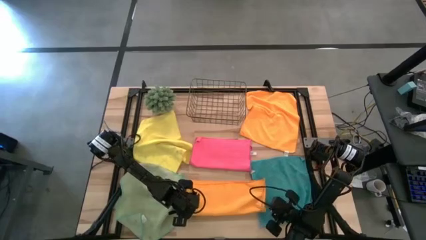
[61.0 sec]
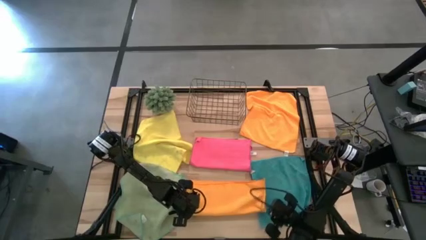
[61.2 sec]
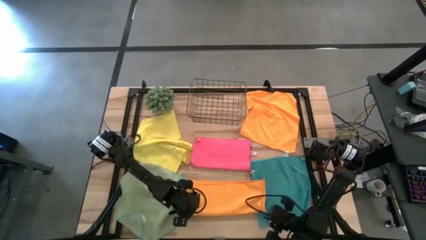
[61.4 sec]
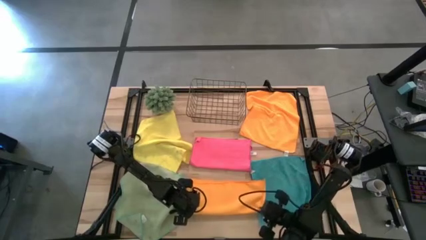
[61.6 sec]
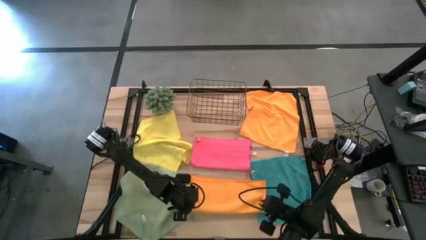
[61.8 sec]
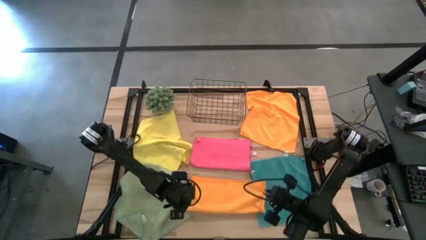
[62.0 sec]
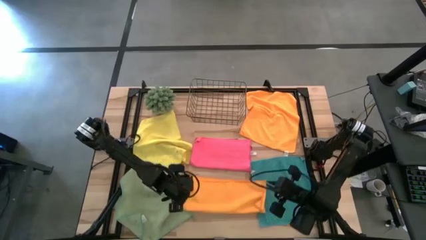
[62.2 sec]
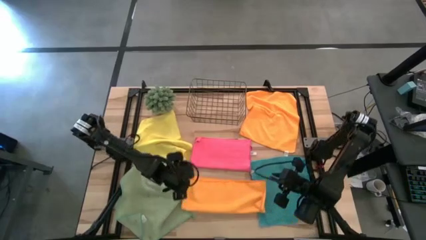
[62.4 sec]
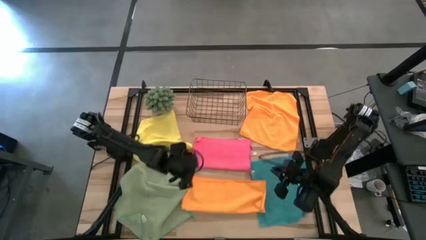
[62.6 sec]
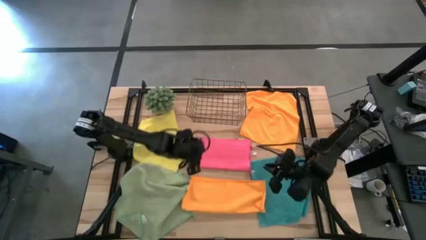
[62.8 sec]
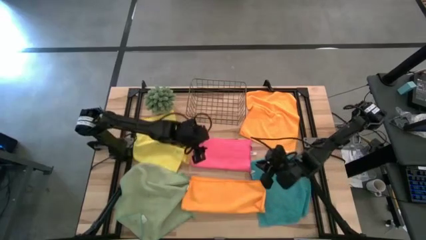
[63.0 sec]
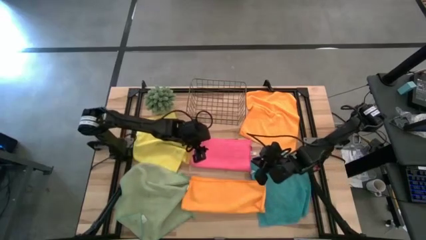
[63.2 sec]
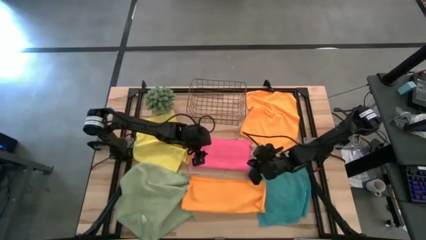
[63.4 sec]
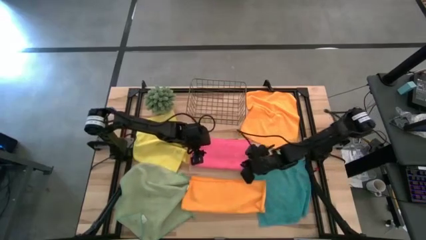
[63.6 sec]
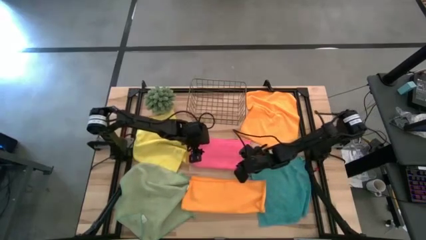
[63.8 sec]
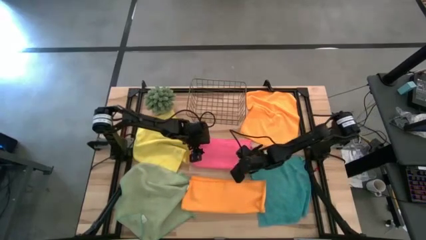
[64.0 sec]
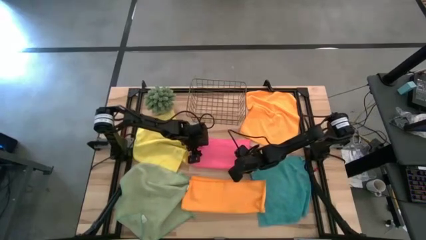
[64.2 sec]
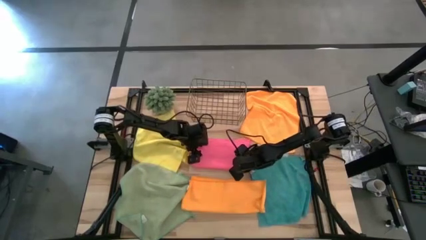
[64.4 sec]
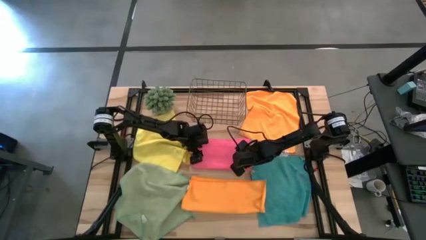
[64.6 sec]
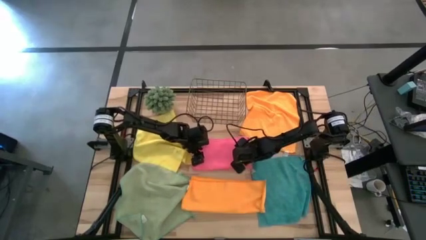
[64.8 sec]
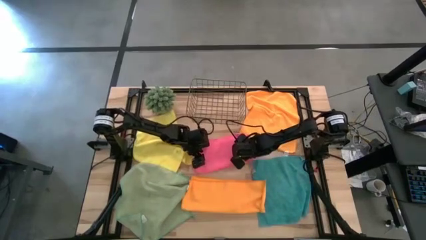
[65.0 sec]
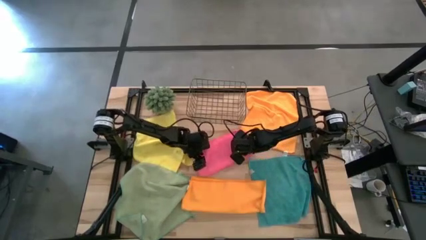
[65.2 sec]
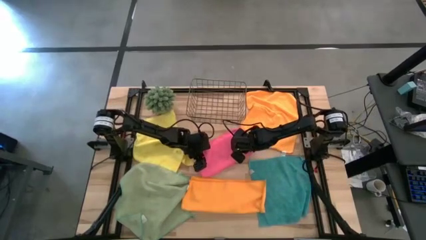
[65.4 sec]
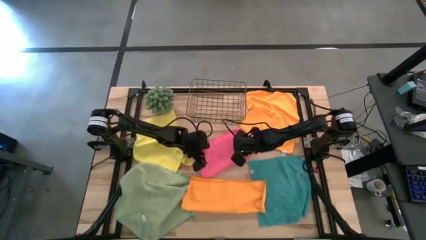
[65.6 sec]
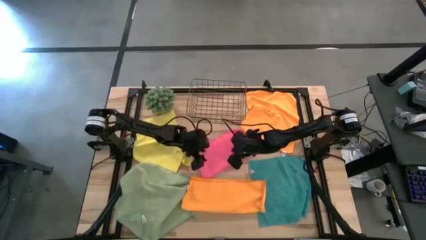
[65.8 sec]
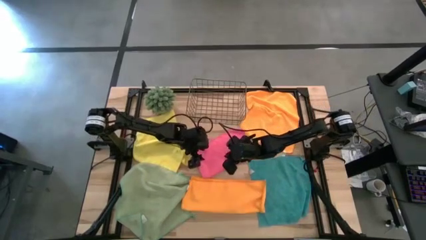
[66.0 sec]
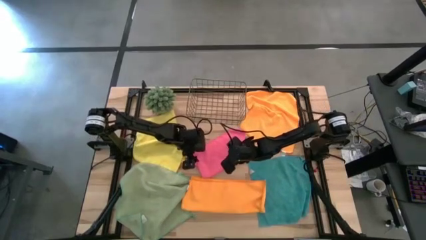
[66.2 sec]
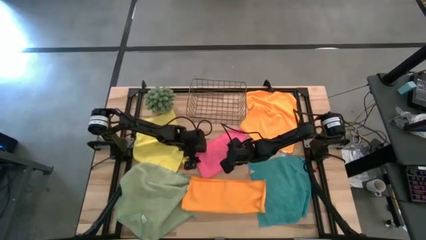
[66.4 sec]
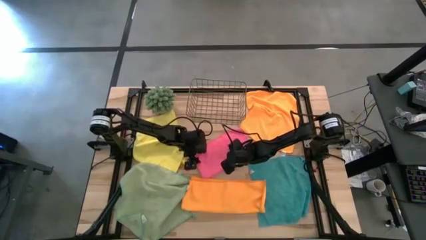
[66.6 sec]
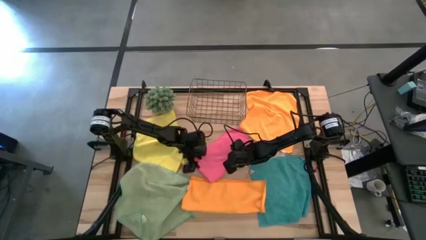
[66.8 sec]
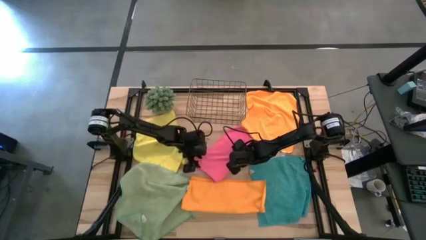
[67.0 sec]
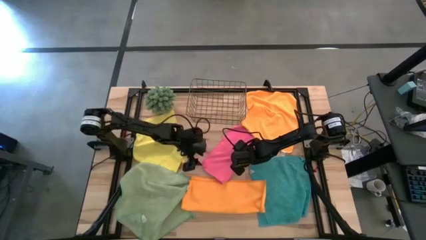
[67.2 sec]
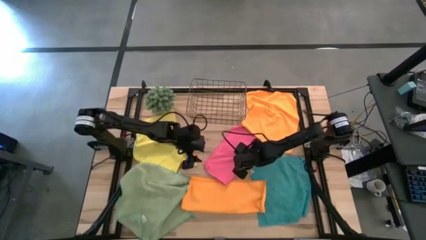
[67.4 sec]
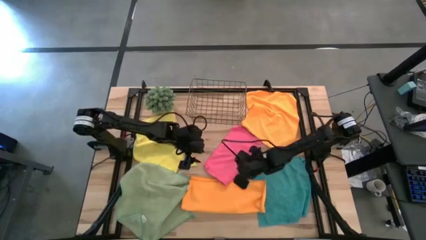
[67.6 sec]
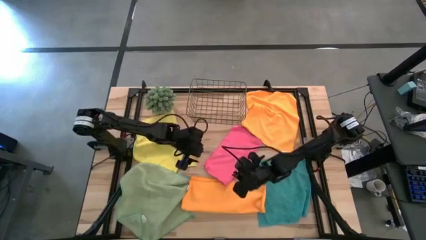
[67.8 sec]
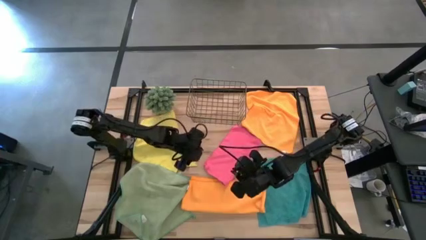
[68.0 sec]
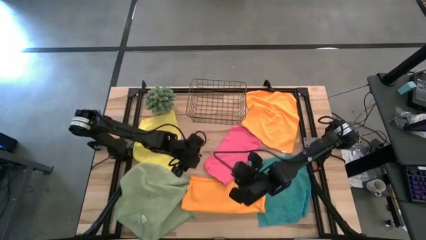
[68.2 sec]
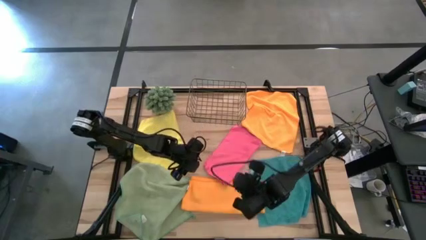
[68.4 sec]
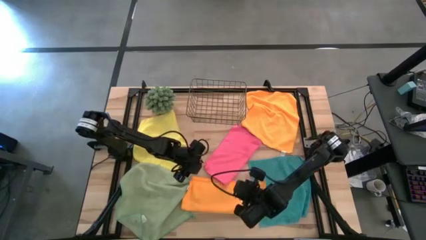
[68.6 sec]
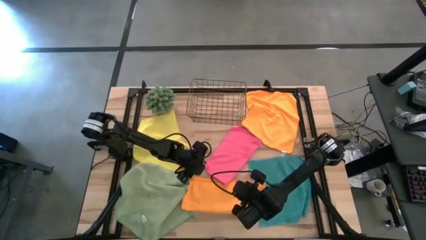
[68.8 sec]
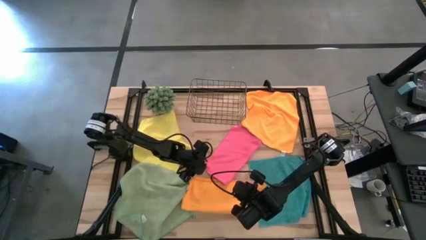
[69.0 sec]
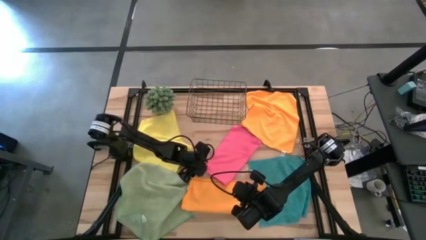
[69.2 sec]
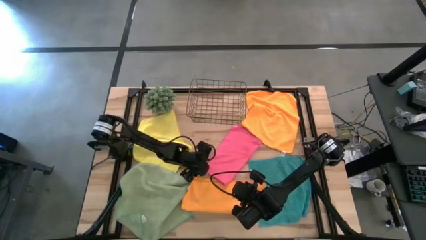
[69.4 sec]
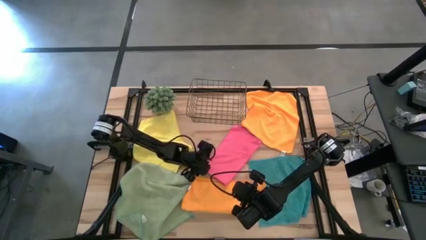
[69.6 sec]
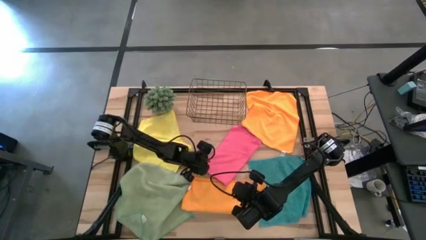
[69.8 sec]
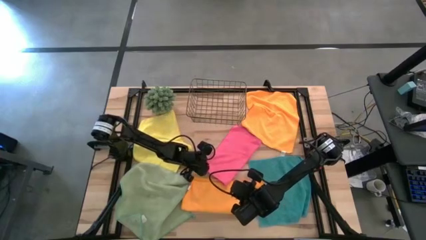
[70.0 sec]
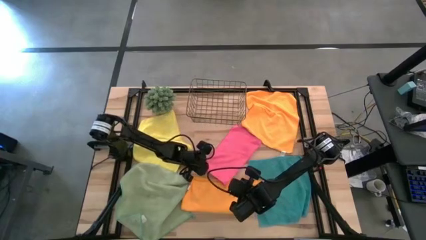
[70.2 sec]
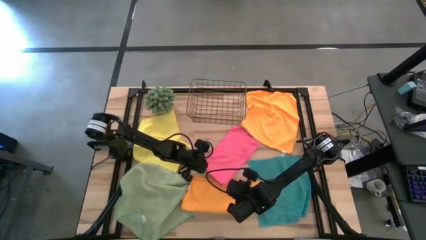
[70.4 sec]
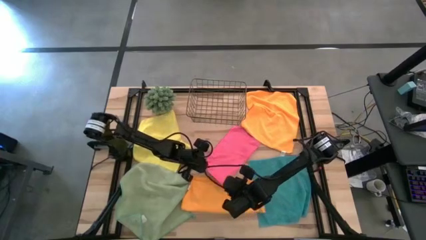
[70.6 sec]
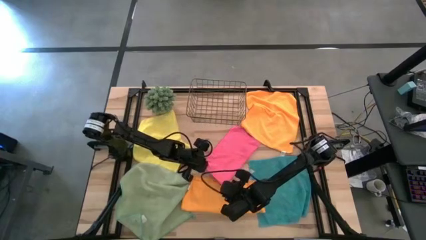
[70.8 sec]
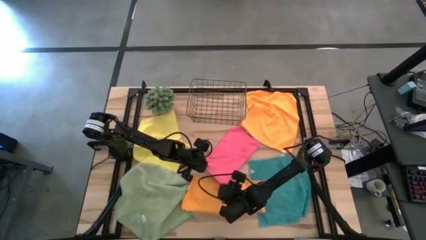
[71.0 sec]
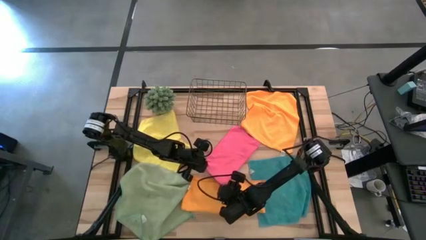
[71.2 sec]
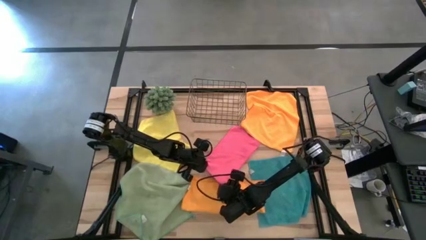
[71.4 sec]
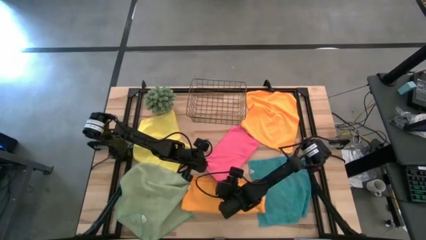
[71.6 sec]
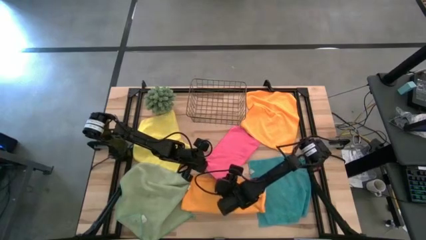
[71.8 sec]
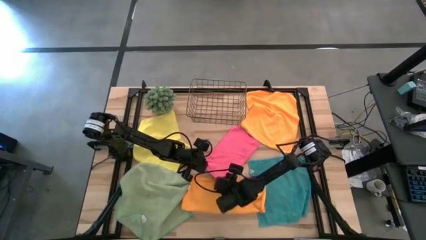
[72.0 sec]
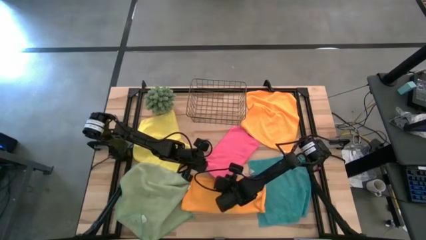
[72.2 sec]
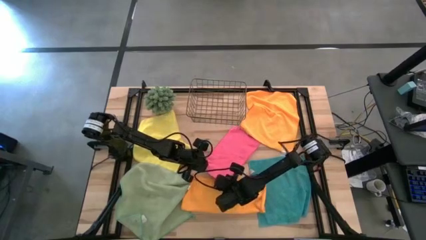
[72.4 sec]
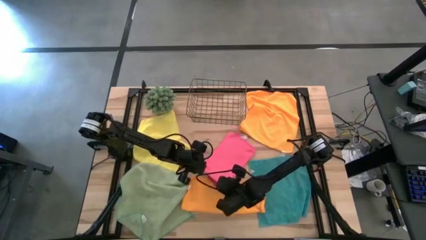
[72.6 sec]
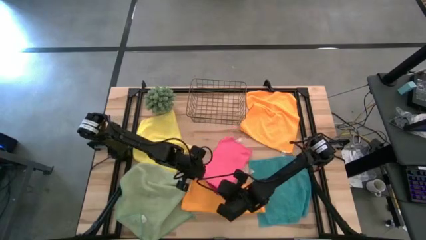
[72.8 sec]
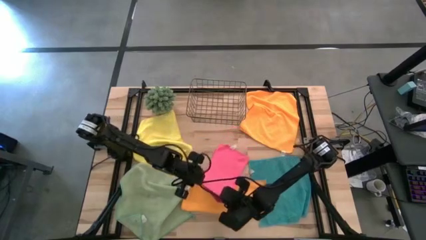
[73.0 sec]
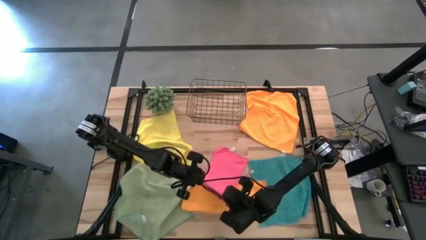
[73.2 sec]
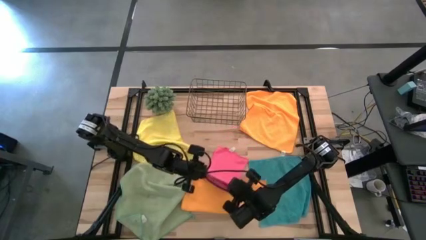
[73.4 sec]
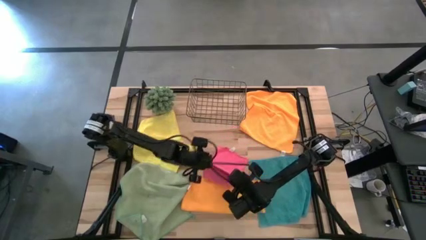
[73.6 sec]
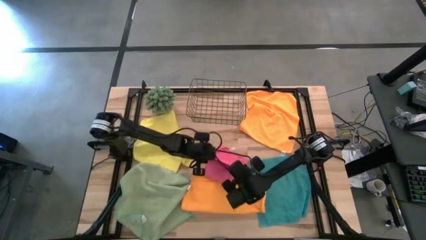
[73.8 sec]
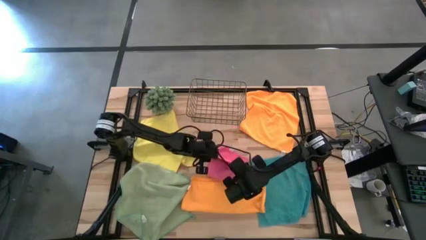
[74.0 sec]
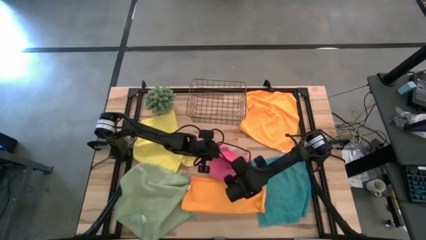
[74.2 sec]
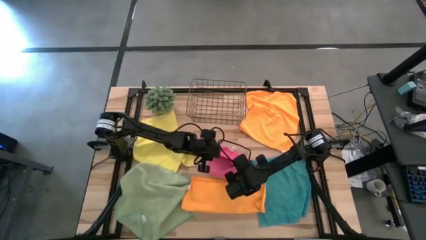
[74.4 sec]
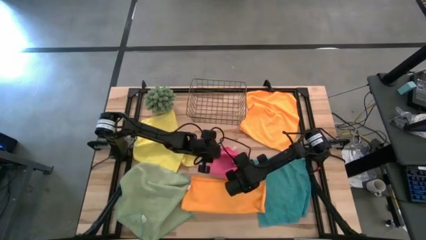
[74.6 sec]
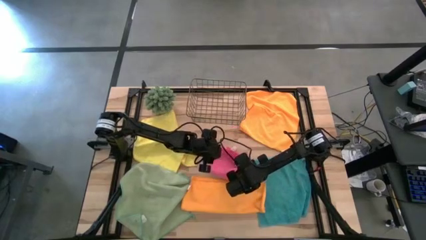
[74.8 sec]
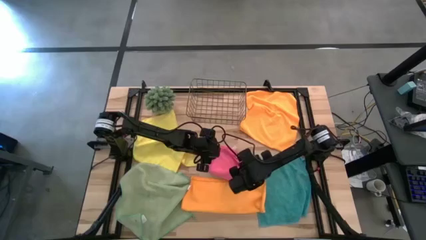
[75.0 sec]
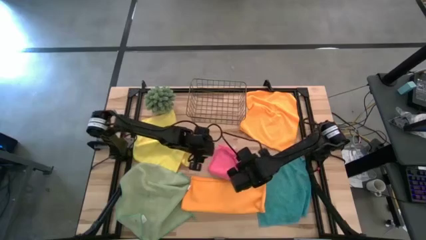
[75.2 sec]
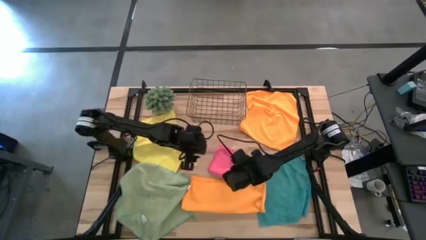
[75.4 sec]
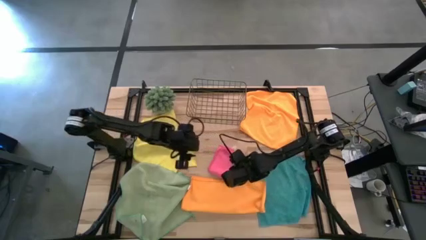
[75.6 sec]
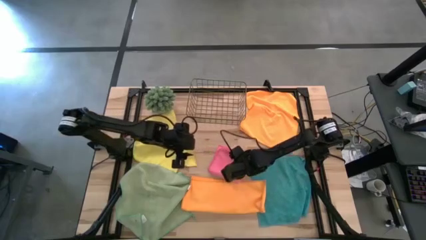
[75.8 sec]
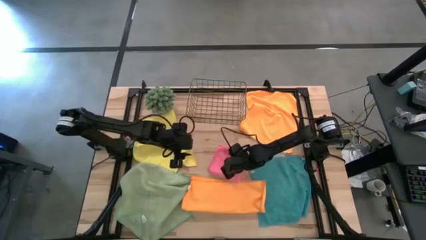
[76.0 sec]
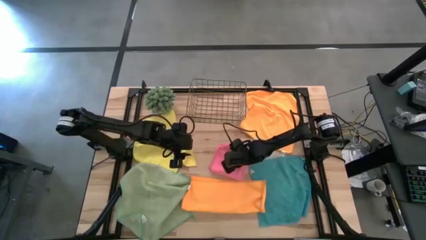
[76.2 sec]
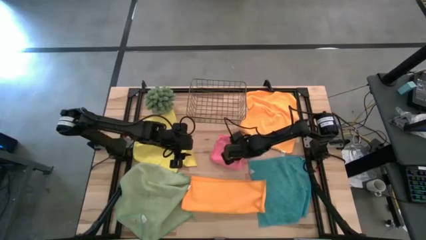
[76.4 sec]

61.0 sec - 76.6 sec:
Task: Fold microfiber towels
Fold the pink microfiber towel
